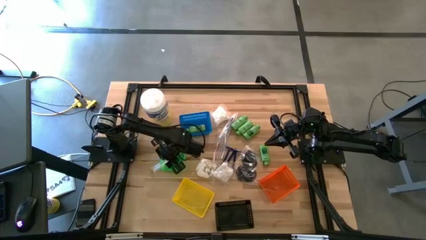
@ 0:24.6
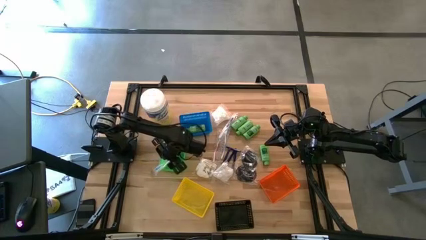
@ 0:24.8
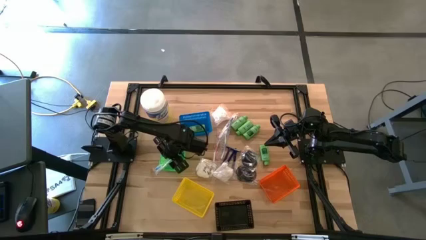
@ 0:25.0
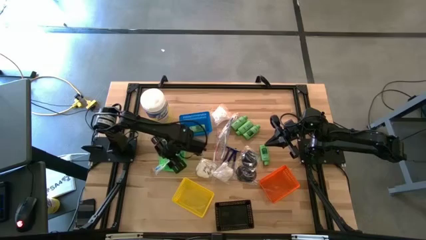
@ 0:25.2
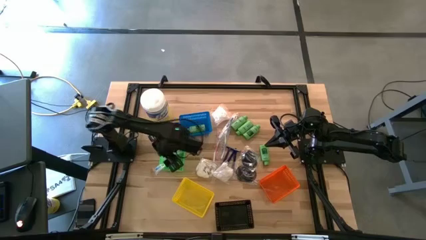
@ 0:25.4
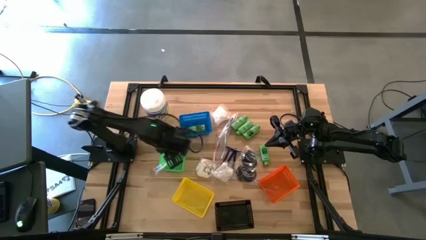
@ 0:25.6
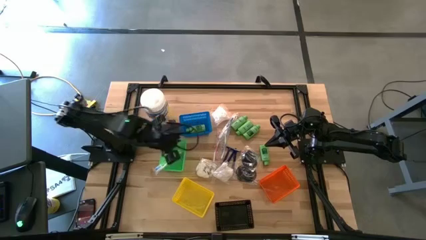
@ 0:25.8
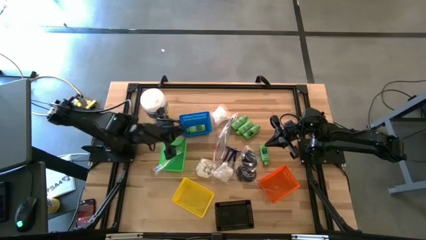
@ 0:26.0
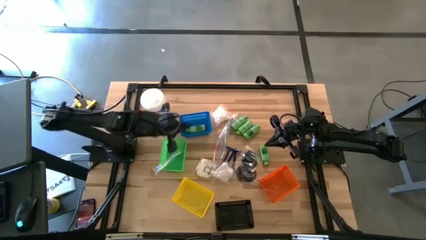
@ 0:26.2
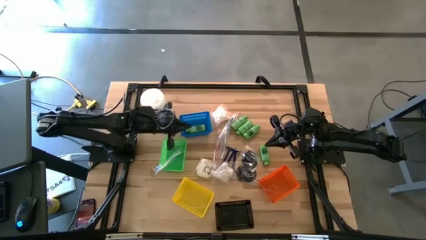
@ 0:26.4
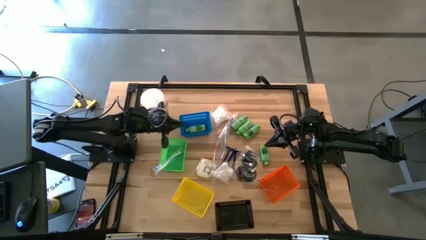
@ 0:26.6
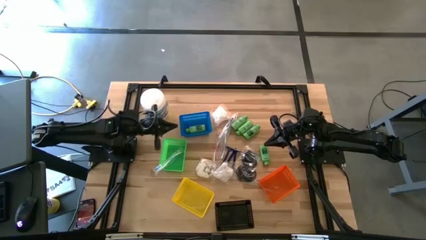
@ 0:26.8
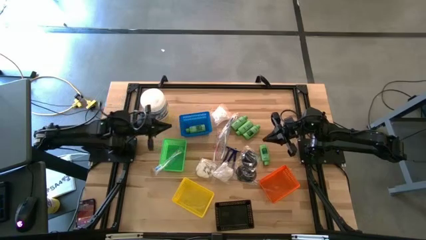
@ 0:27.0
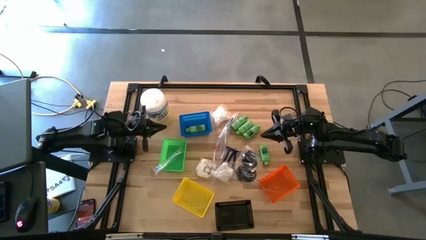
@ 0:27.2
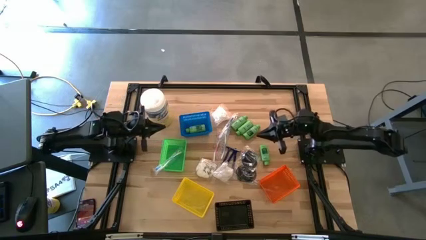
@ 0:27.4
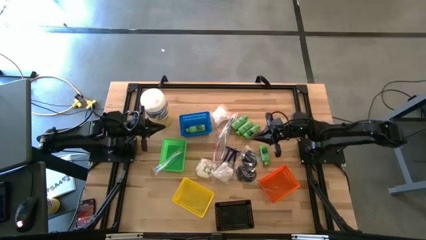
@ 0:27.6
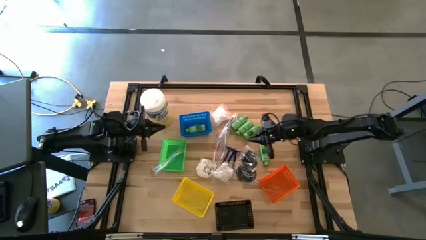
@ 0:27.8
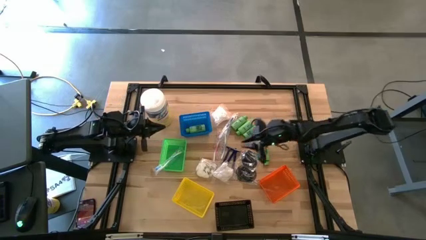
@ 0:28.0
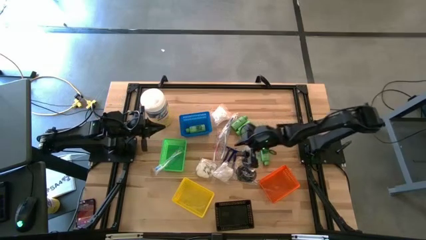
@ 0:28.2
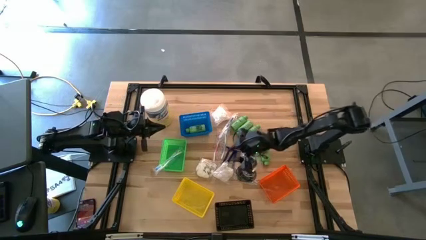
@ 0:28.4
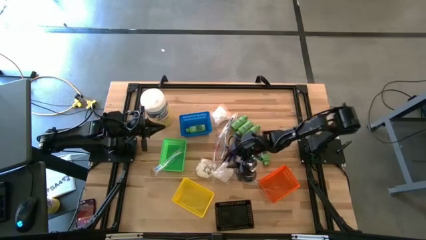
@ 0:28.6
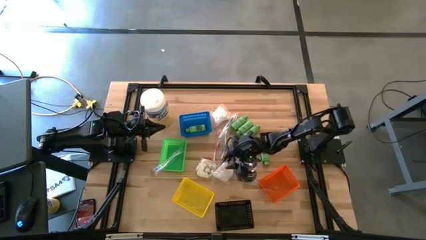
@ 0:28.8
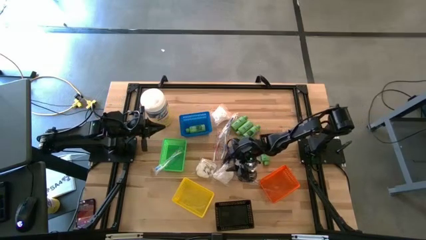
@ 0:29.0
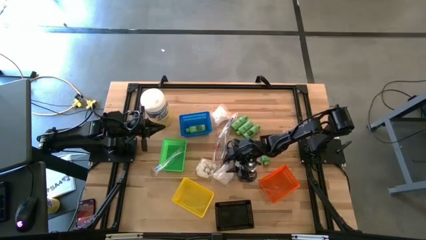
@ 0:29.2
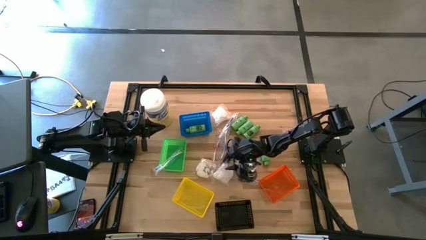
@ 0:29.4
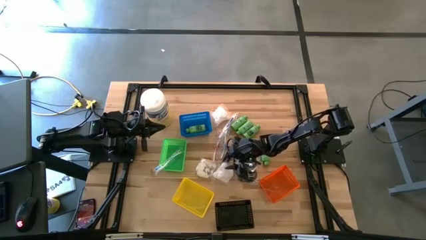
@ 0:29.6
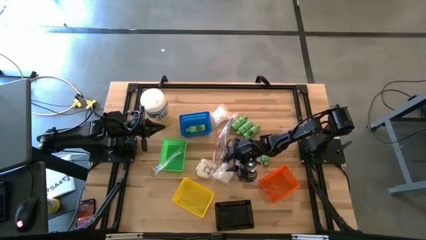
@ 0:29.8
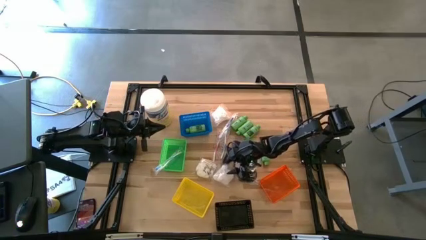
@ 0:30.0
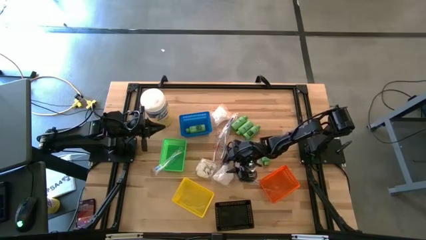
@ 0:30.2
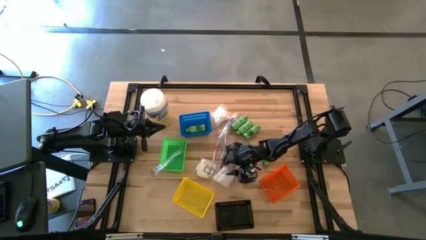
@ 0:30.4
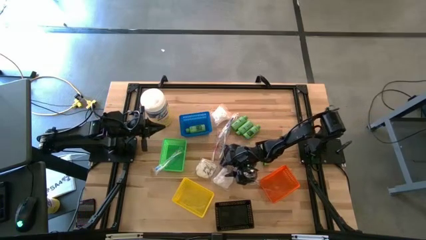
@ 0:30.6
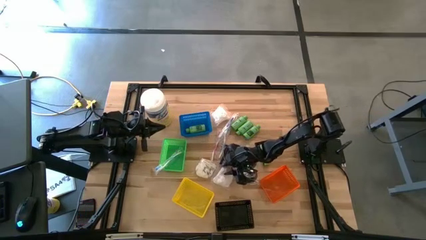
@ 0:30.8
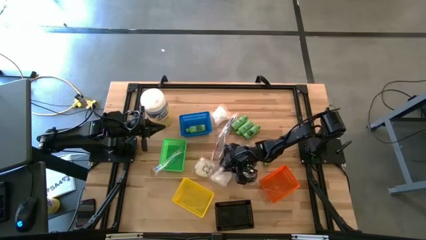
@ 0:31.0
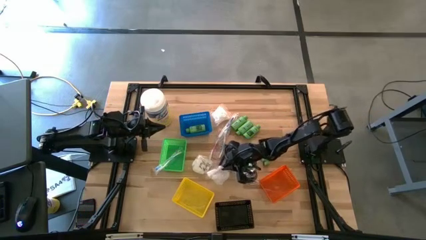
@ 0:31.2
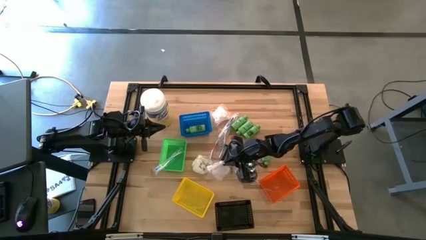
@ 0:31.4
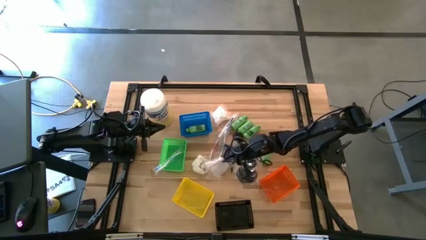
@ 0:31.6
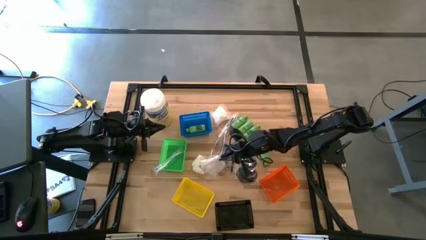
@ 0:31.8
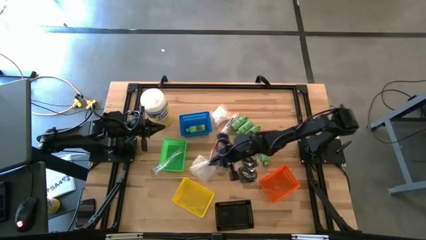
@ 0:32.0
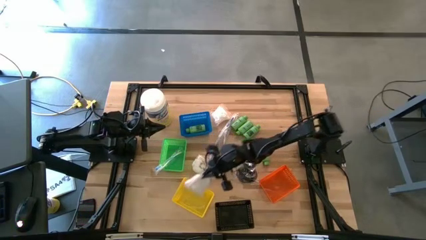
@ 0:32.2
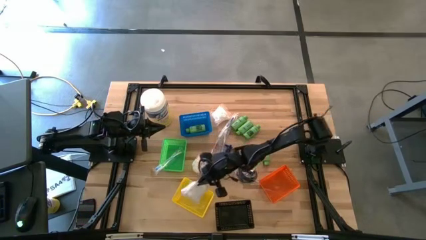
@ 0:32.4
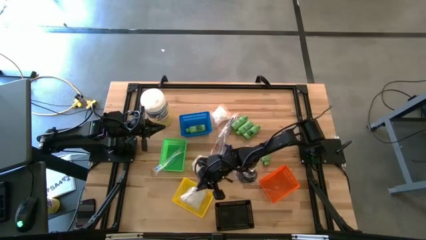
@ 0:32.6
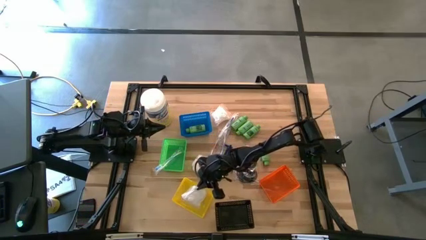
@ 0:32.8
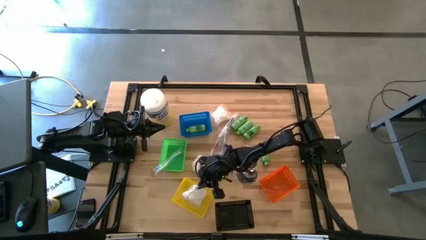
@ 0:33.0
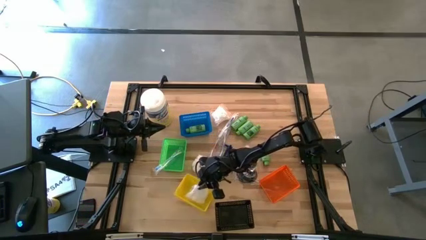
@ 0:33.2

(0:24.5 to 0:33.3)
Task: Pick & Place Travel size toiletries
Put the white cotton pack into the yellow bin

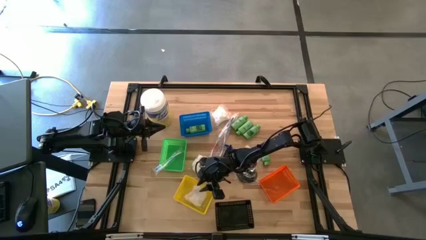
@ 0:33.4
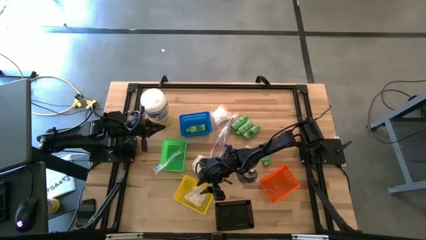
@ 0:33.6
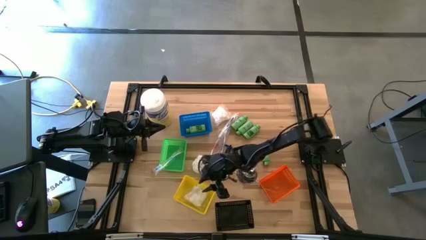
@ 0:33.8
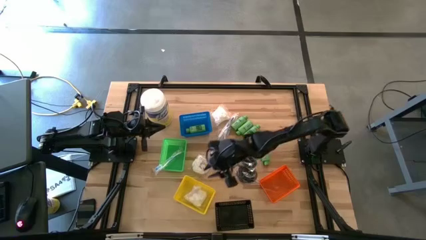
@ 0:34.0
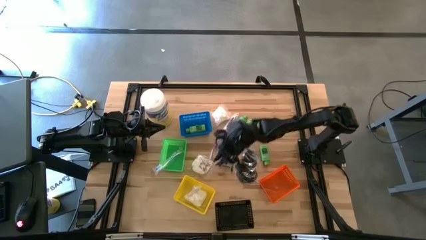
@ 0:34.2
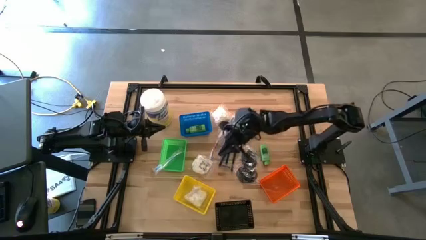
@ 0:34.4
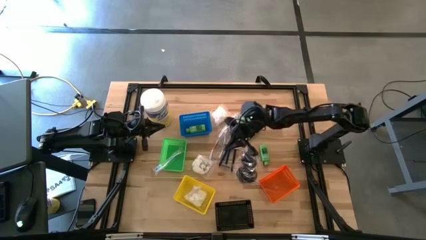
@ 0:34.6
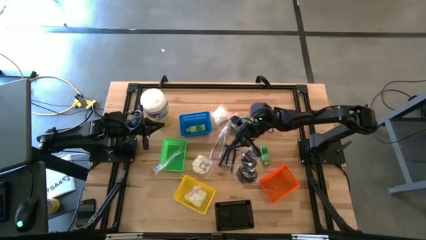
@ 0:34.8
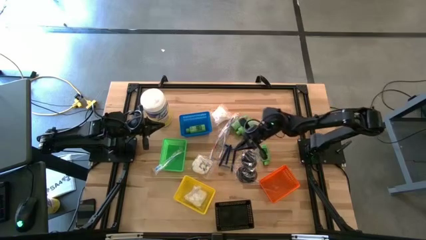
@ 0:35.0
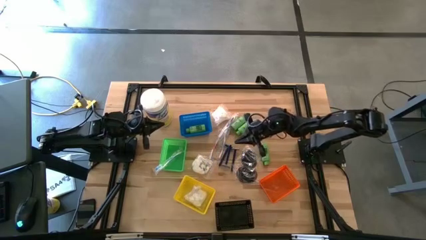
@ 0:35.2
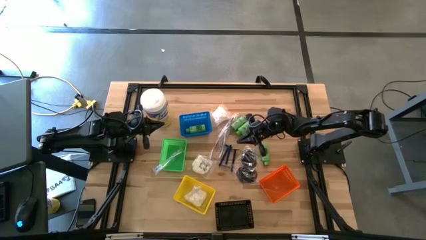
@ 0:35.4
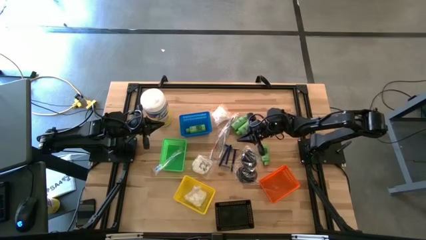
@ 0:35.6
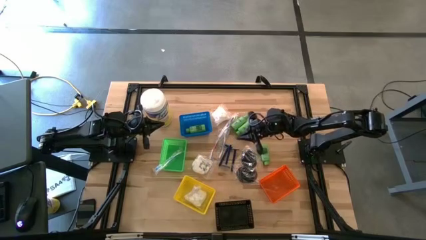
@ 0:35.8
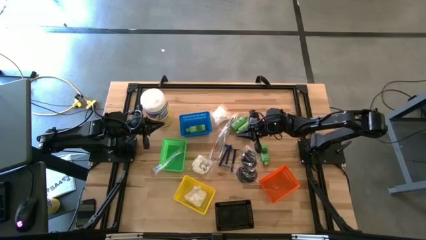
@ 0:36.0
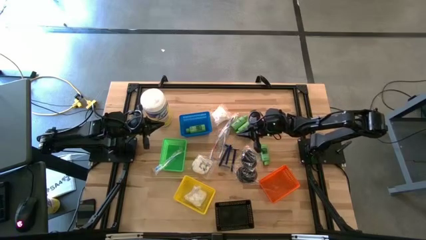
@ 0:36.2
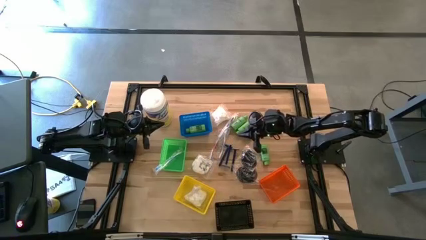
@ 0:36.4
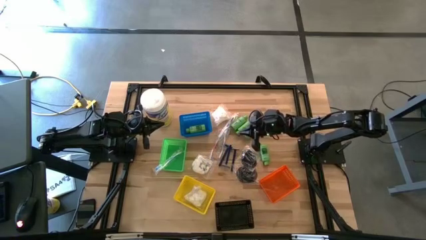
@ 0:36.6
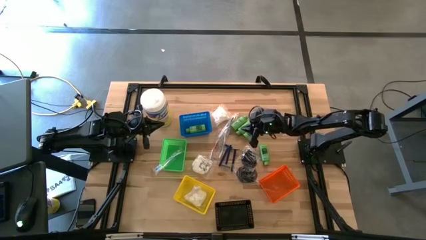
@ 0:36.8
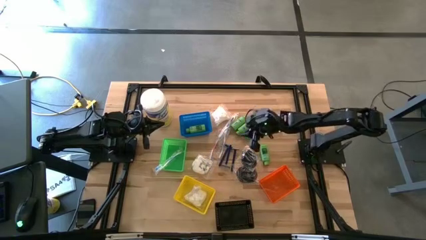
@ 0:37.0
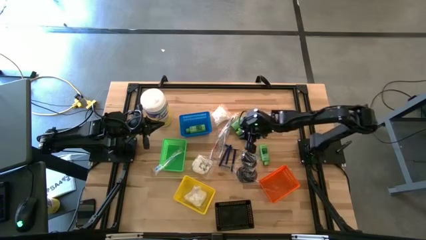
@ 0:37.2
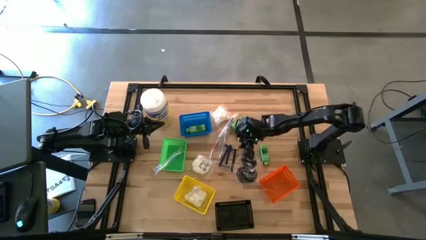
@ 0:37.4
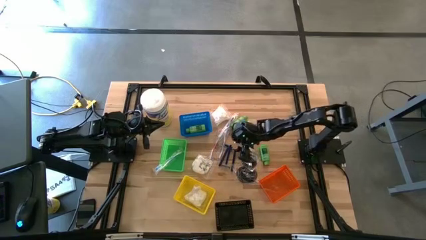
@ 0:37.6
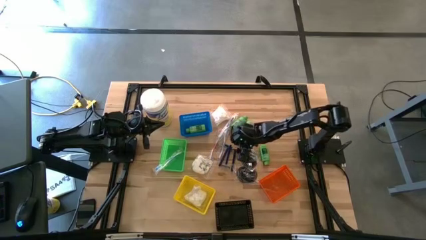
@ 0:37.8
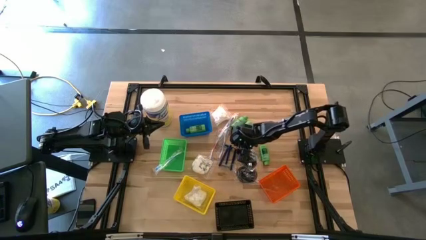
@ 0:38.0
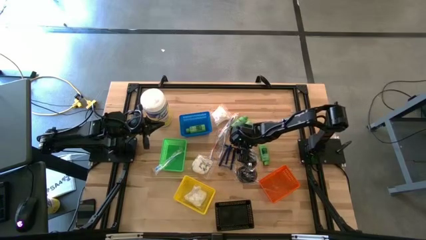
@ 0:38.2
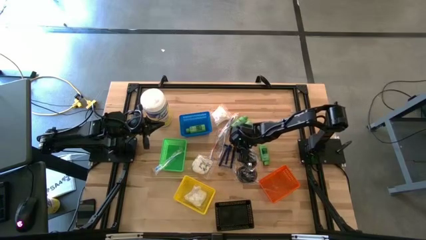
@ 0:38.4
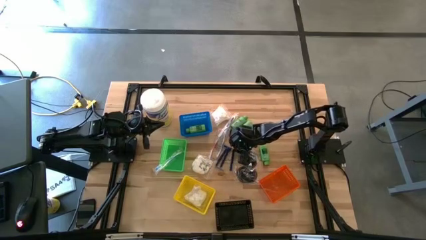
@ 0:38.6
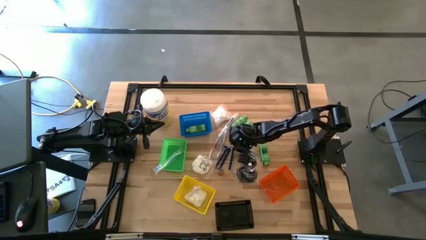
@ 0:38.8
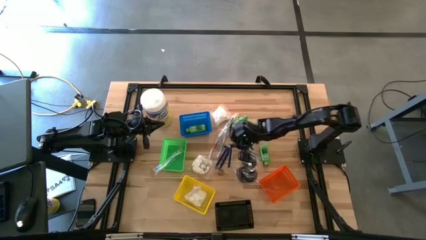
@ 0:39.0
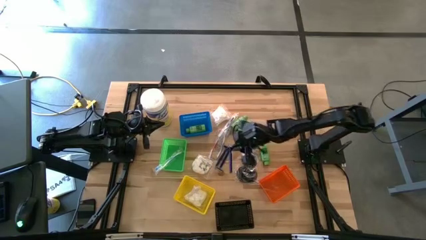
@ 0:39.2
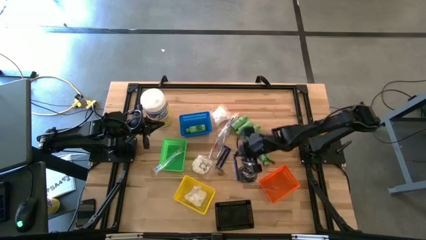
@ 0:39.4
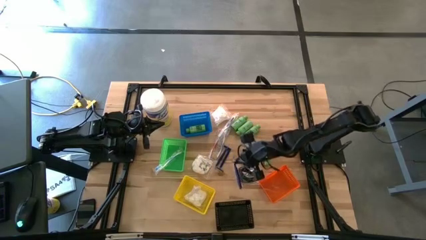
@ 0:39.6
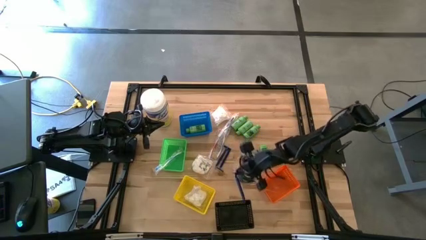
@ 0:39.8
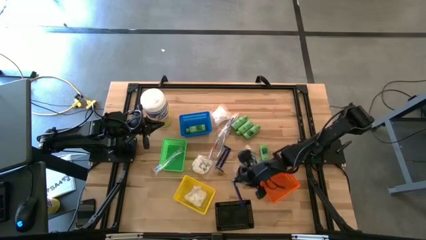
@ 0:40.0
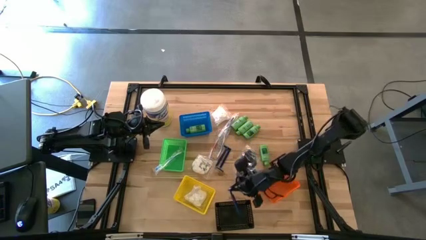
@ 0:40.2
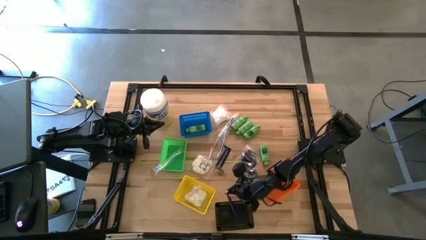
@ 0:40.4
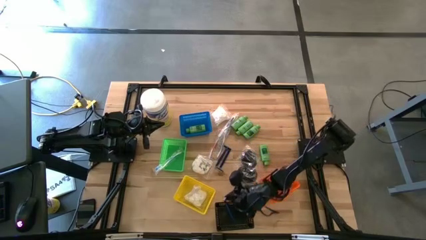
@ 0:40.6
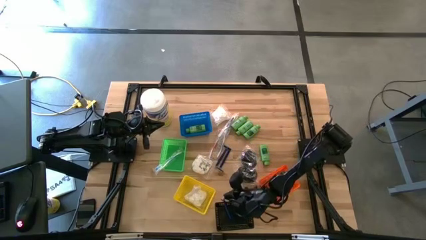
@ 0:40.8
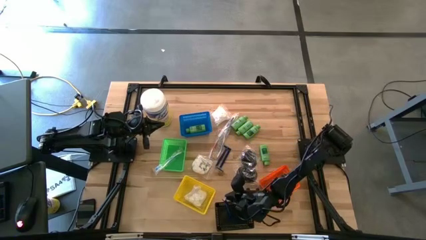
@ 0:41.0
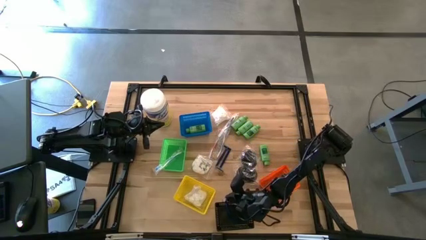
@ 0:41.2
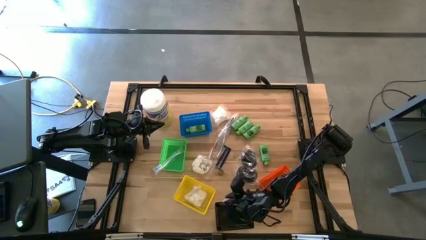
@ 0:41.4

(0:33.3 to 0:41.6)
Put the blue razor into the black bin
